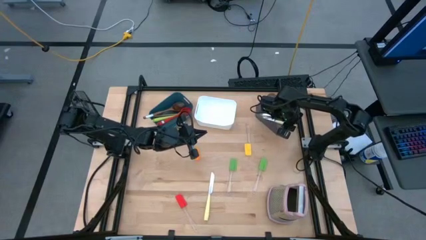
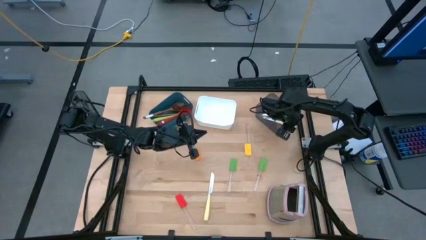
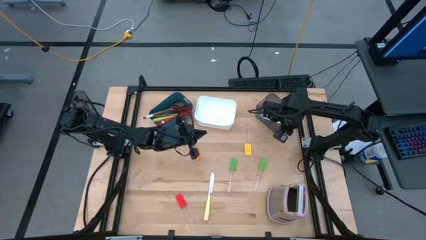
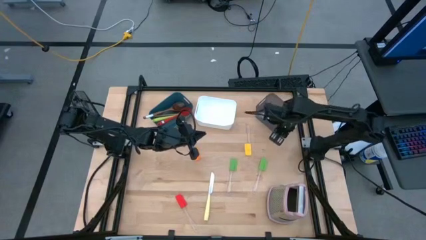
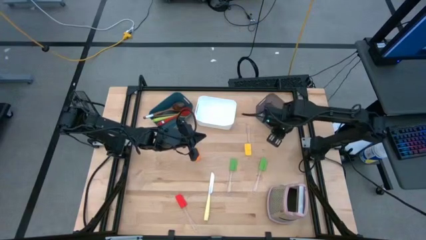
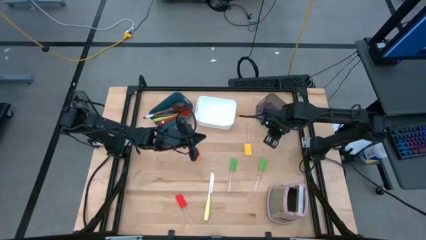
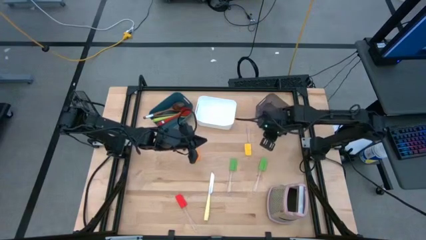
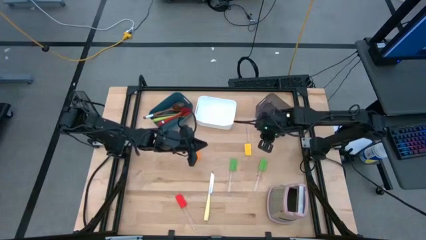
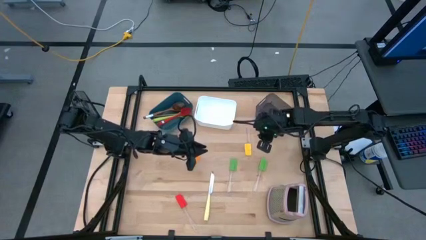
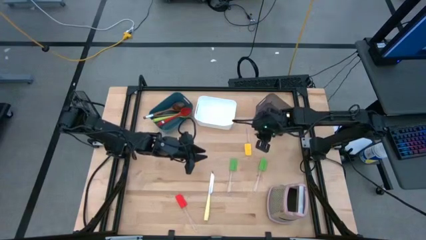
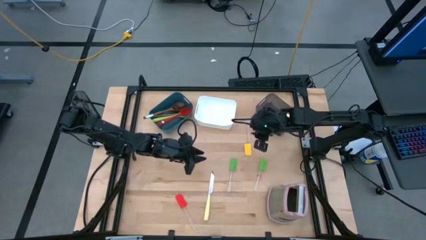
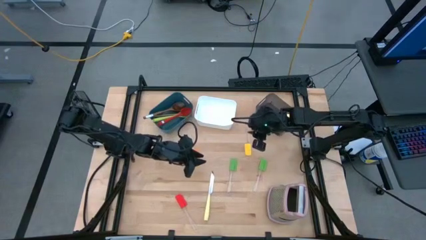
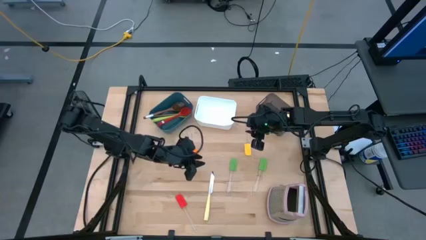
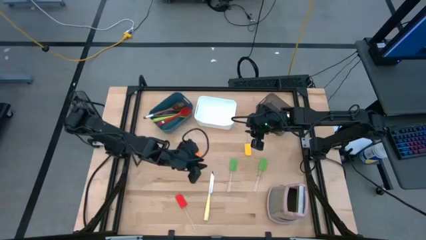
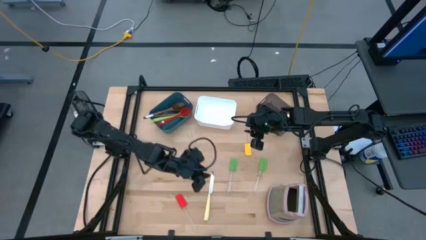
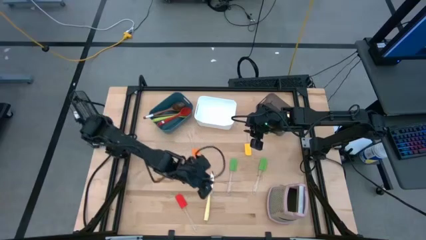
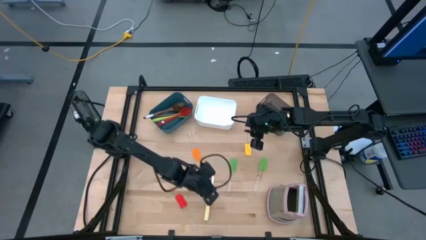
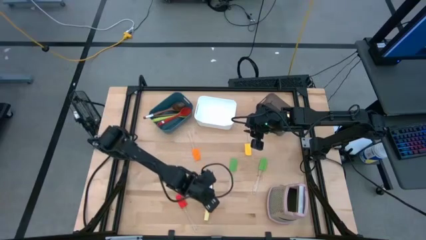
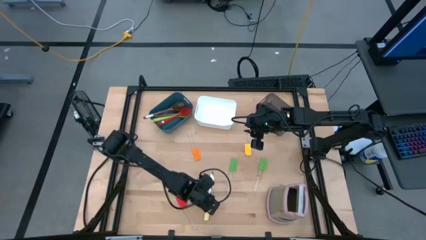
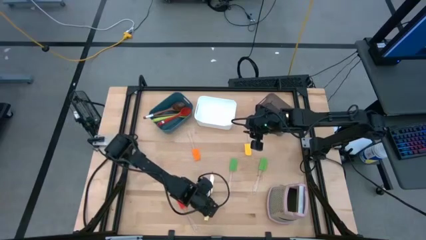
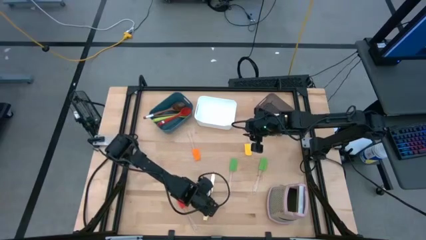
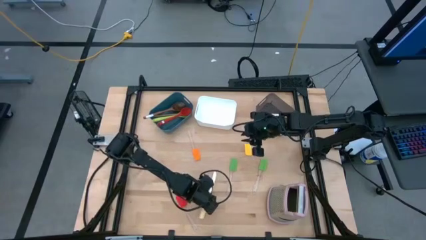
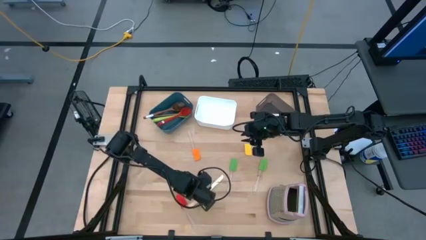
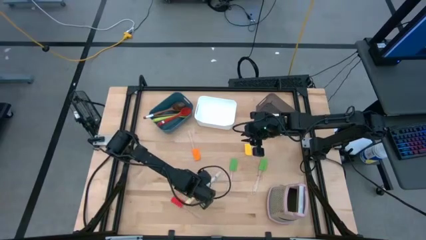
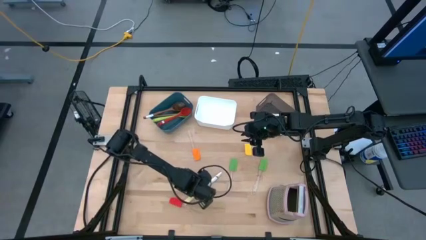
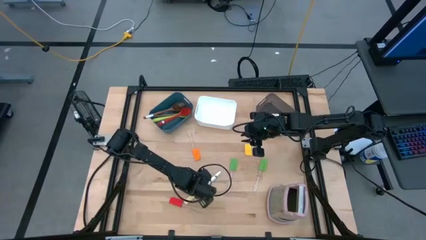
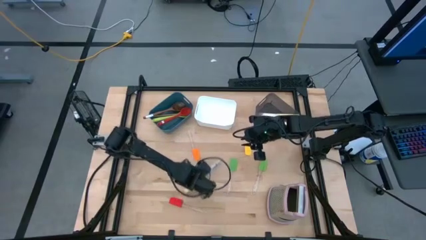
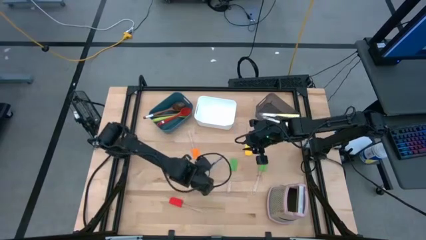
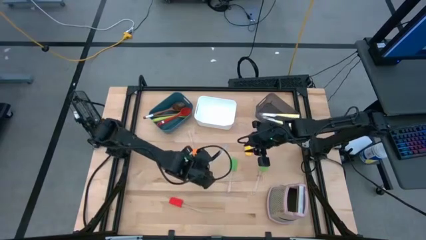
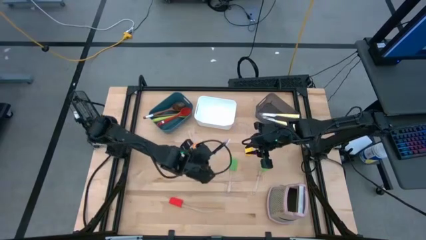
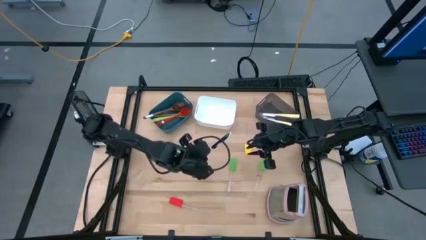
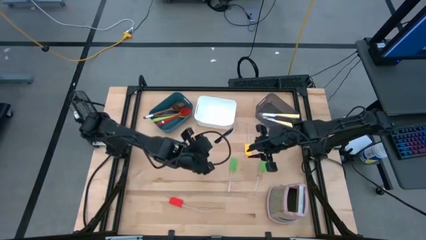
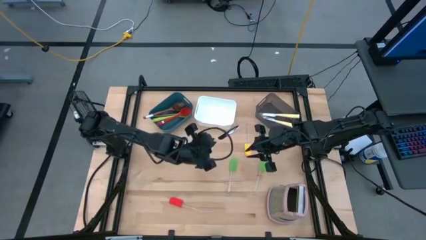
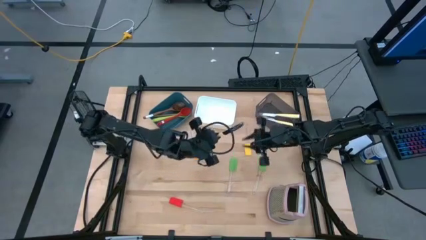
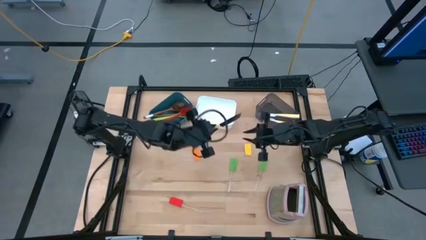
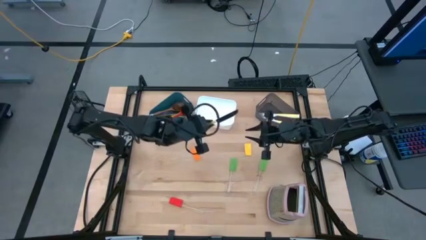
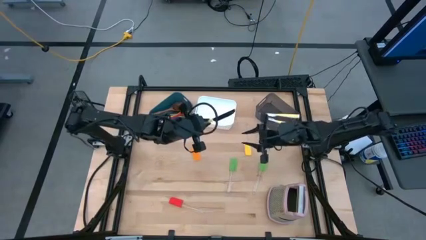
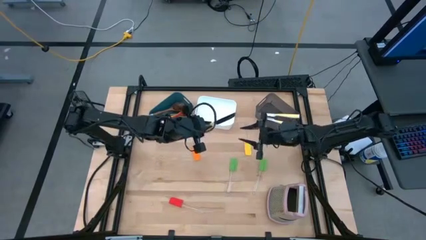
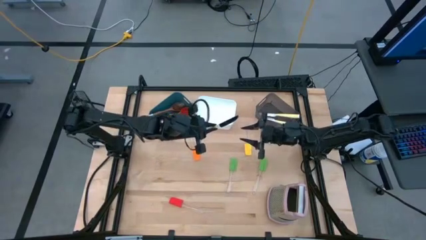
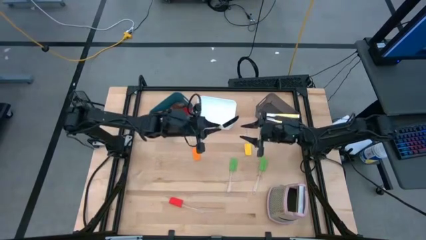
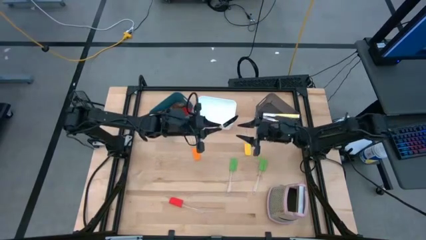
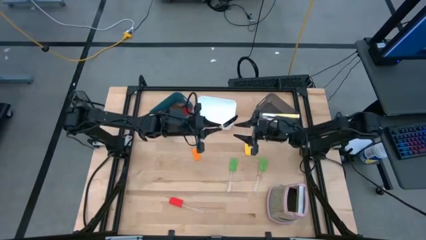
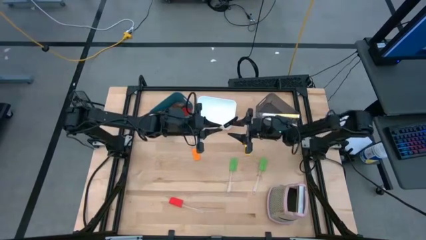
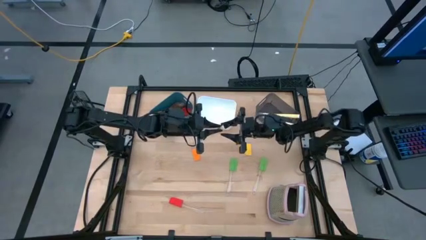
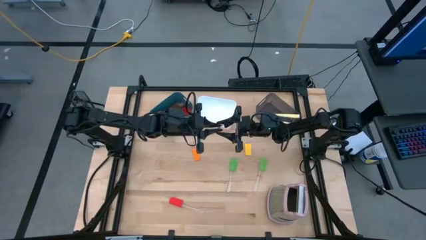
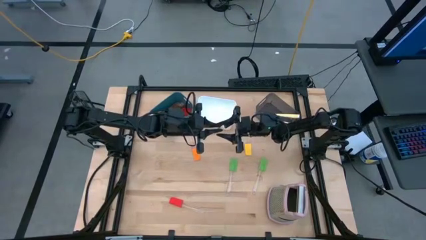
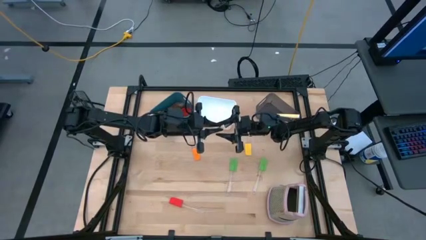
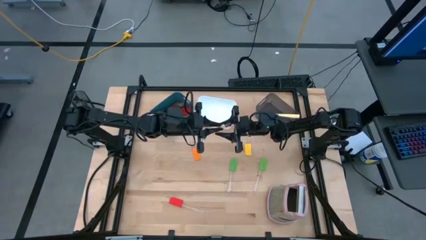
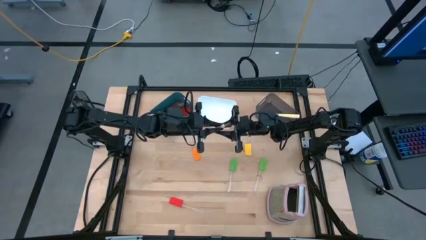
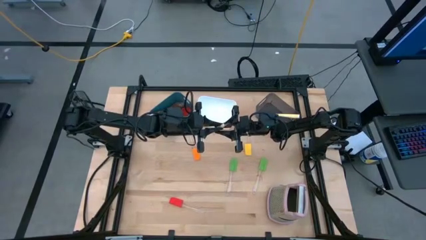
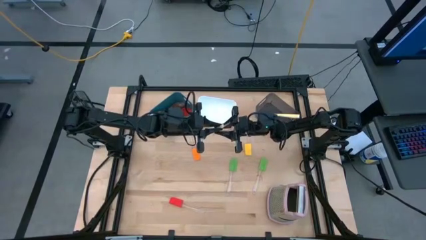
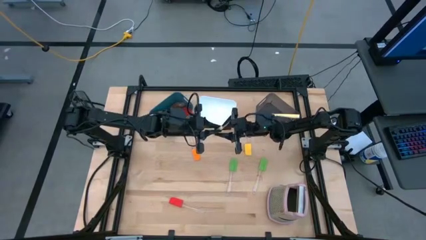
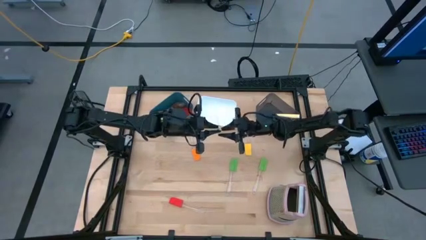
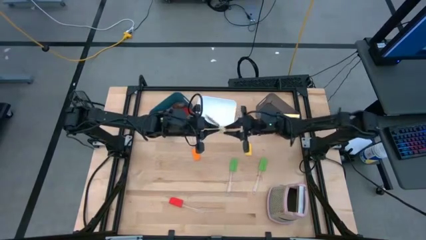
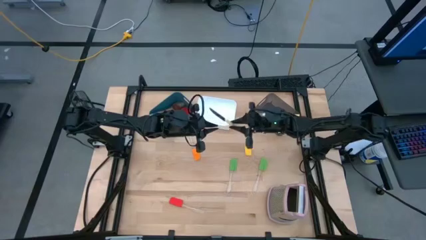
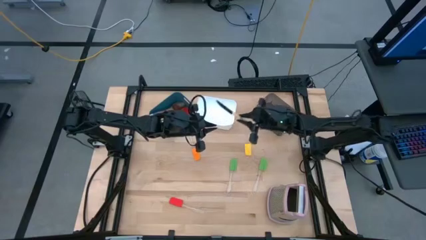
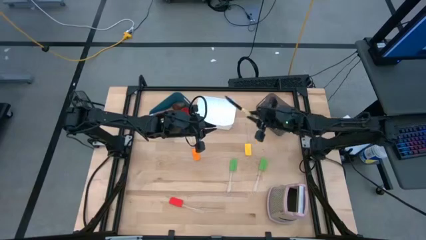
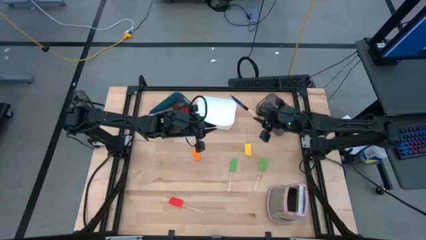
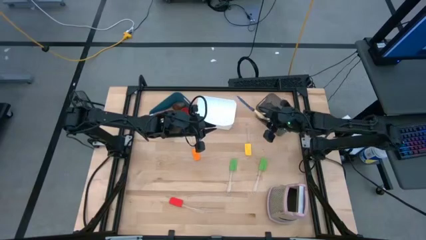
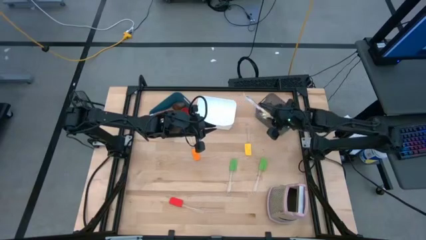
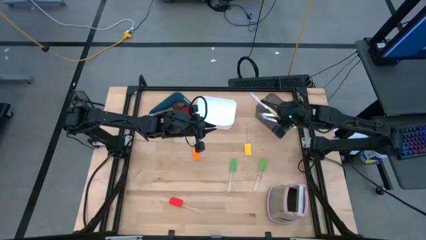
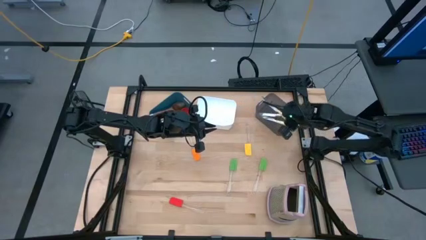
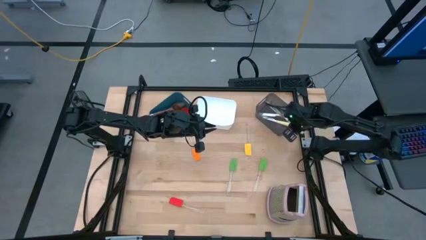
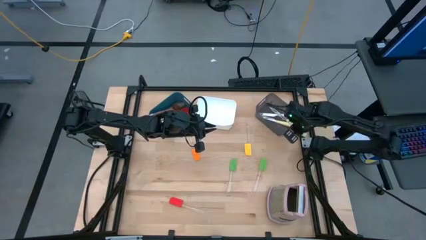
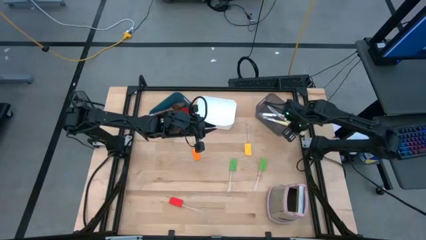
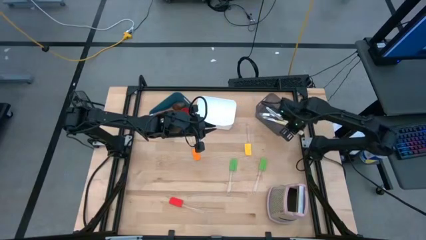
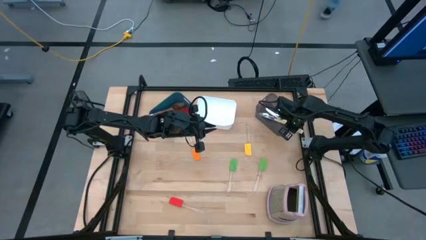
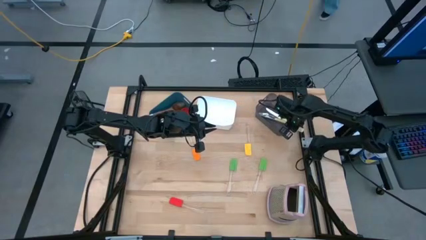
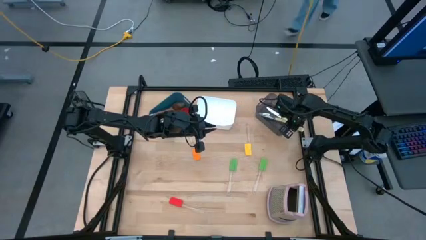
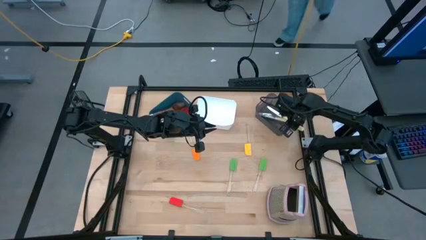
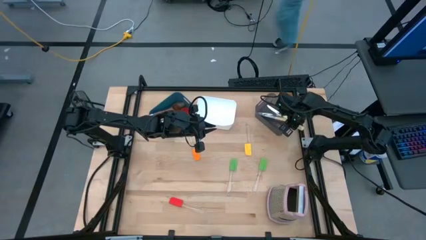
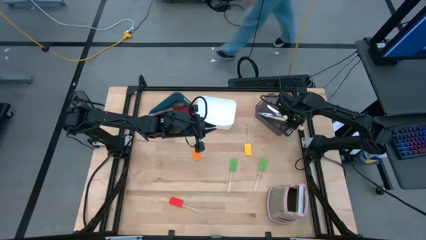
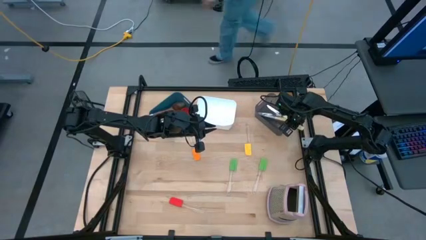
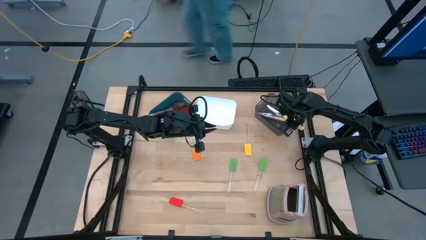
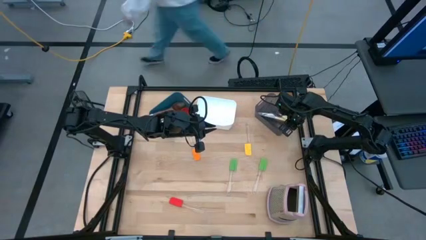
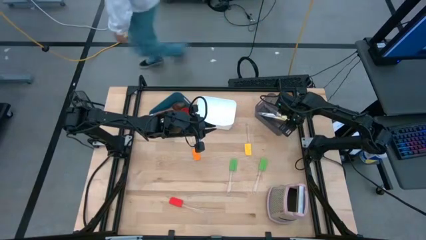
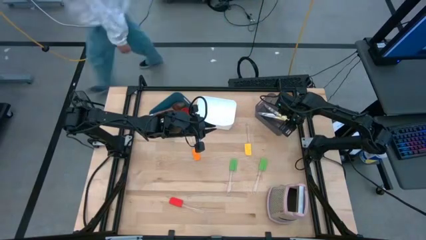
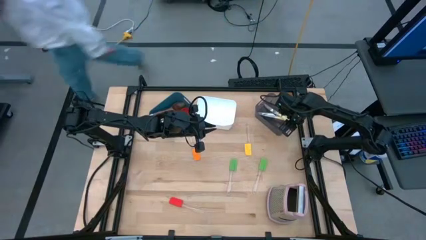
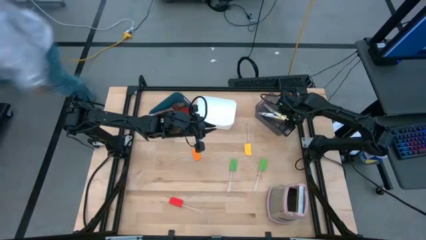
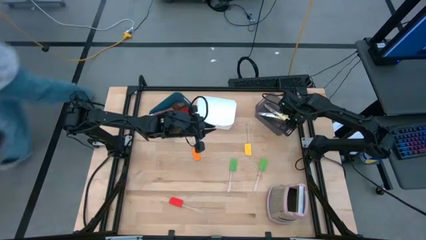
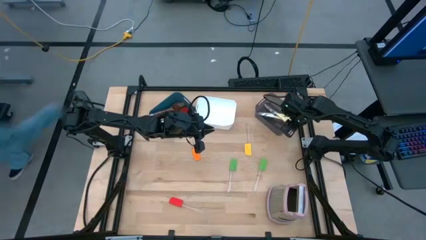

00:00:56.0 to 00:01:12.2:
Task: Pick & Place Kitchen Items
Put the yellow knife into the black bin

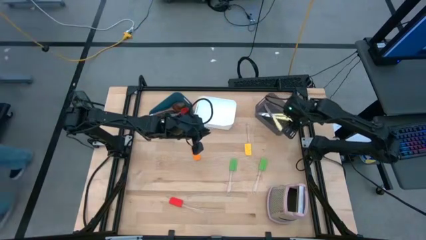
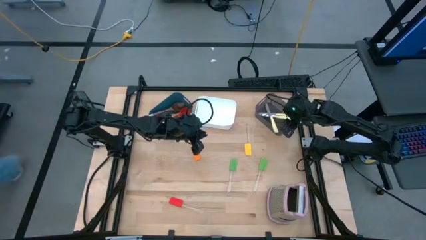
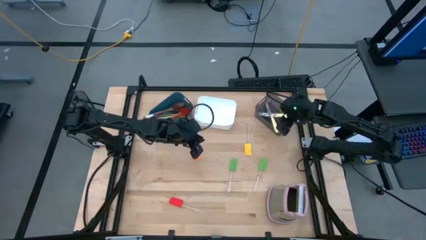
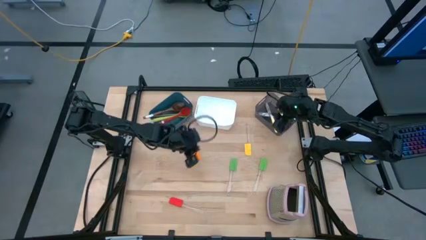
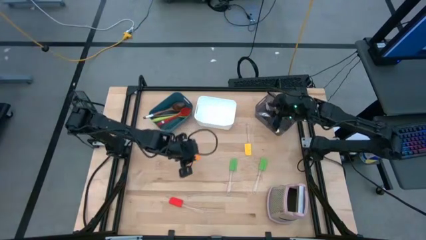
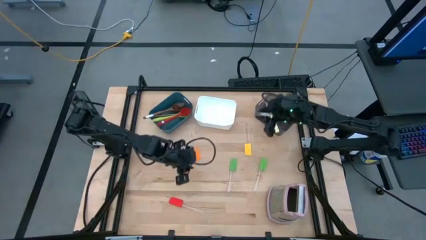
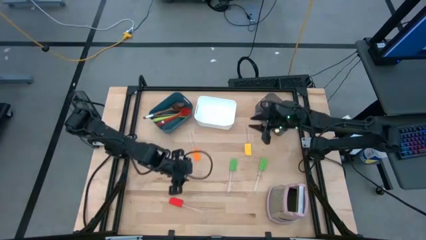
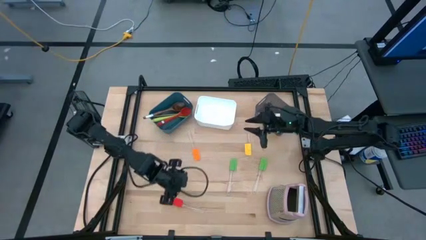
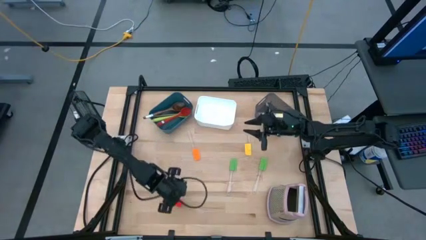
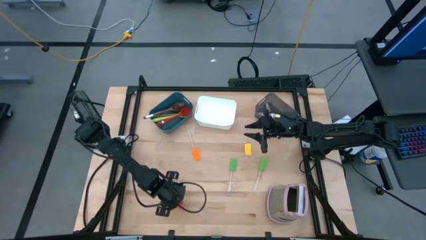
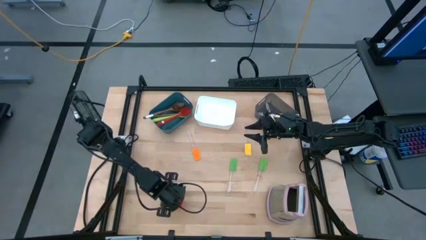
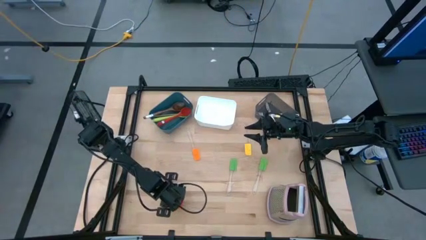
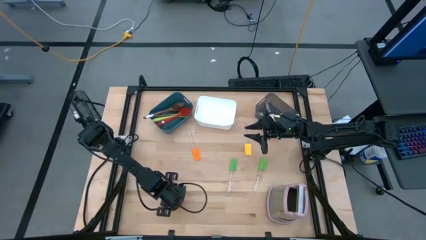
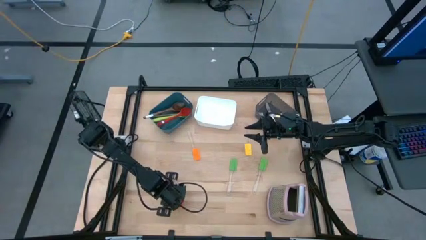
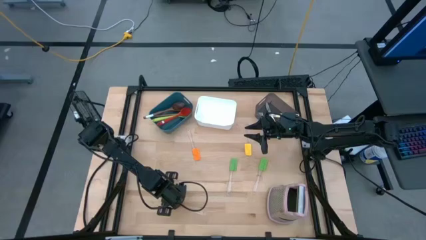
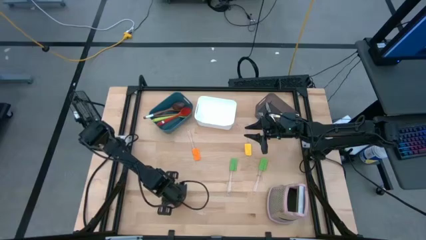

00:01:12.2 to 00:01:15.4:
Put the red spatula into the white bin
